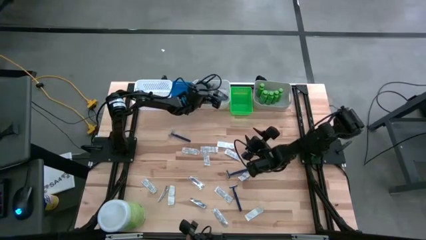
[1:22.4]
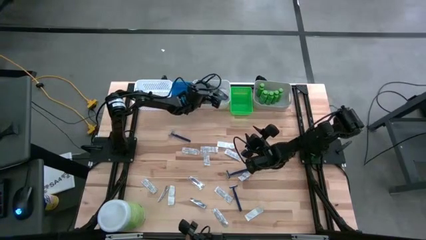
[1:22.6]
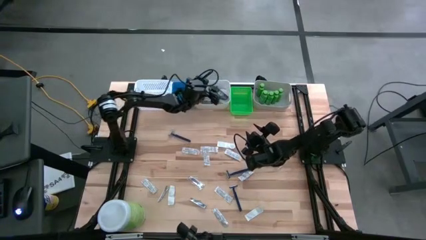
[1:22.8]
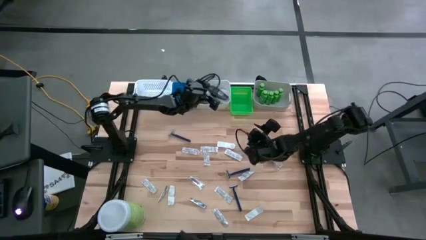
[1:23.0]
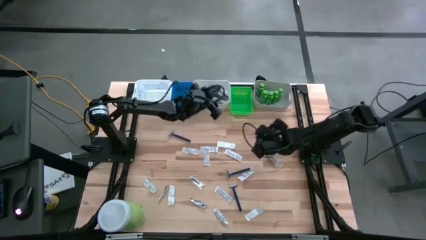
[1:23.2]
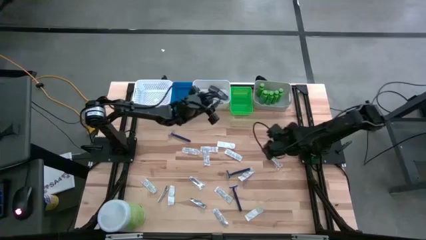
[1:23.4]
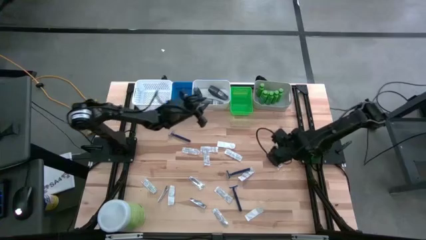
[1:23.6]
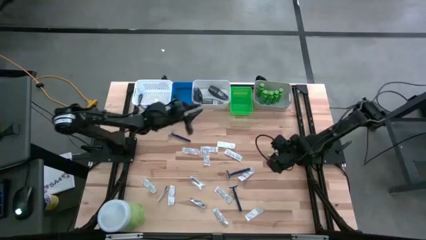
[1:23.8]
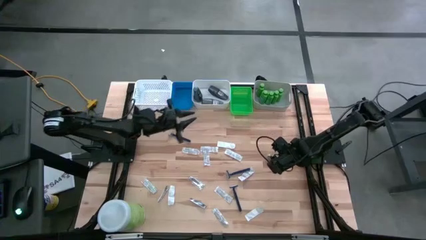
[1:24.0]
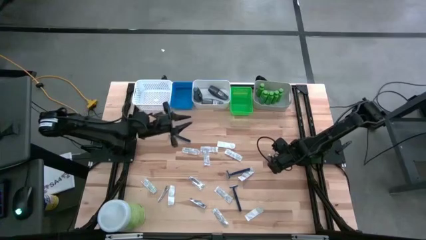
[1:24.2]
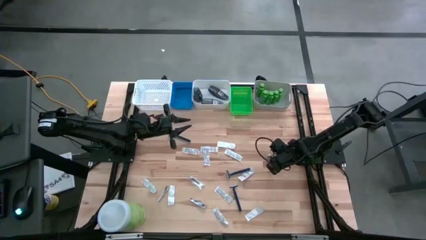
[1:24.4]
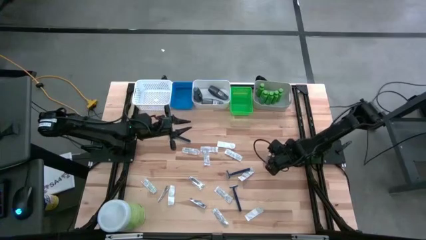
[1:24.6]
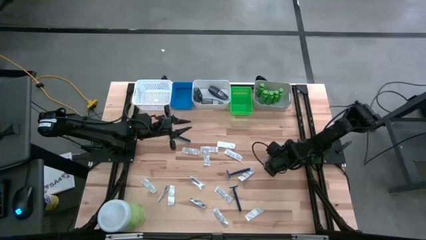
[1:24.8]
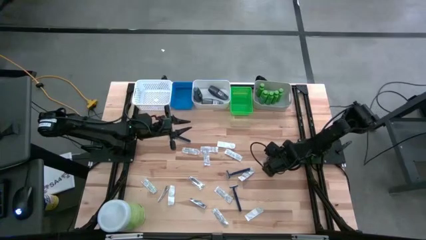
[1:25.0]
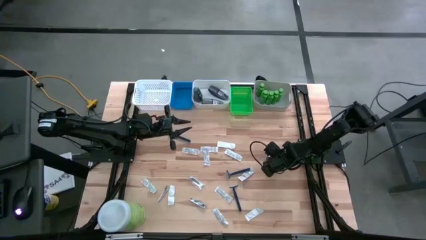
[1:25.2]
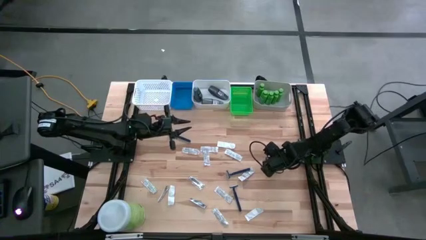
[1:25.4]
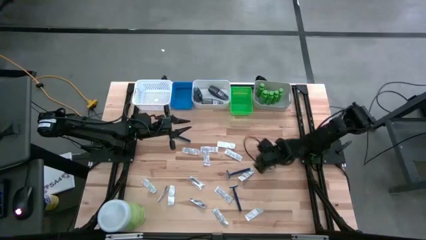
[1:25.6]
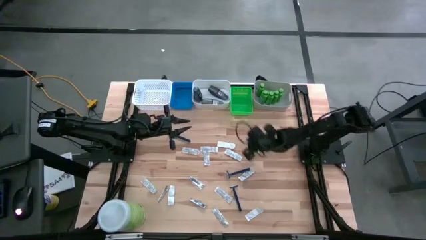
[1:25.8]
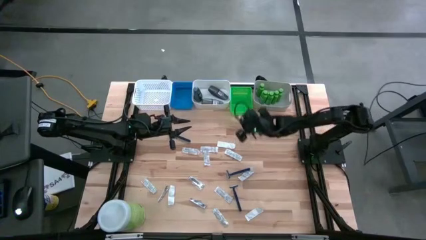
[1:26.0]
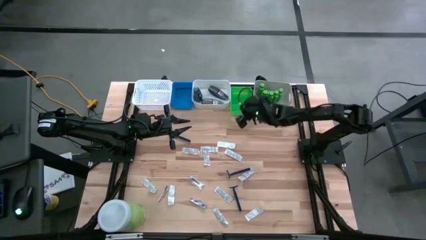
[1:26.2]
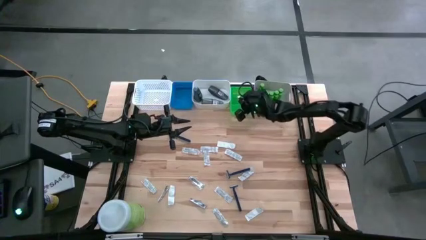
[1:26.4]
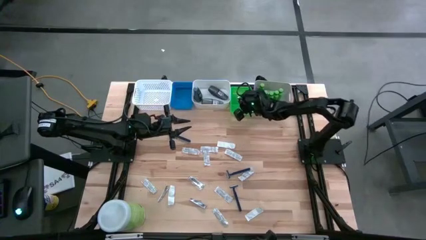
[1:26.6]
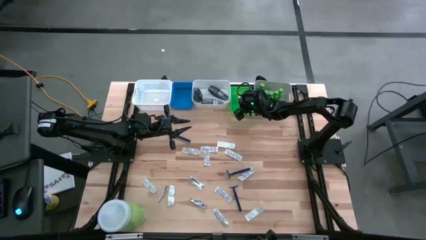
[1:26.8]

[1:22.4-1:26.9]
Task: Pick & Place Travel size toiletries
Put the nail cutter into the green bin

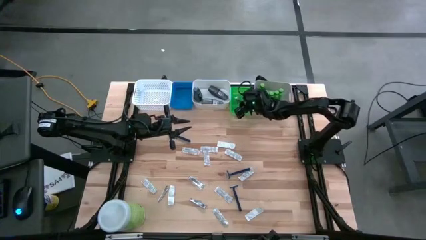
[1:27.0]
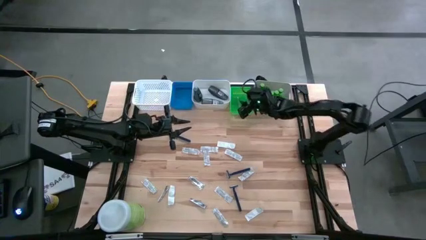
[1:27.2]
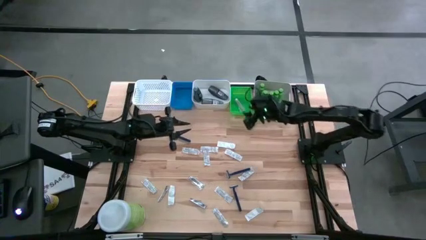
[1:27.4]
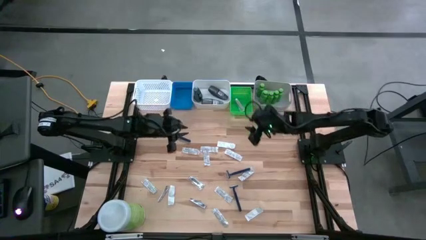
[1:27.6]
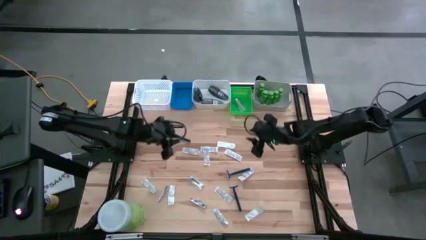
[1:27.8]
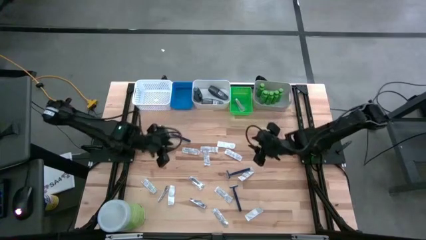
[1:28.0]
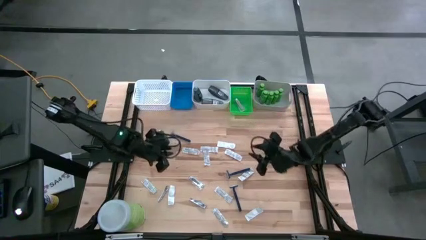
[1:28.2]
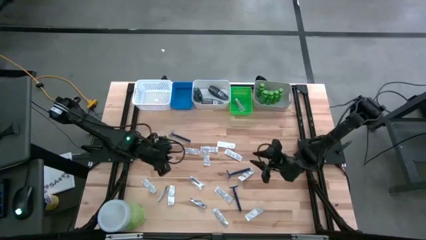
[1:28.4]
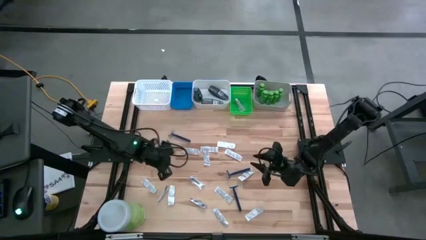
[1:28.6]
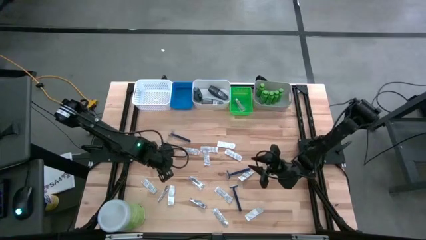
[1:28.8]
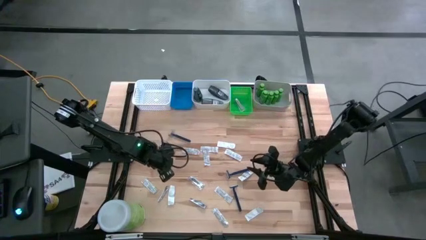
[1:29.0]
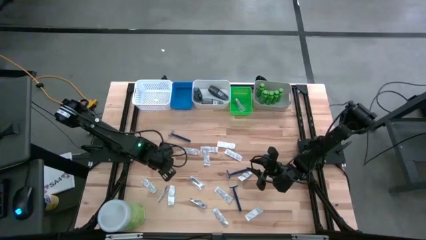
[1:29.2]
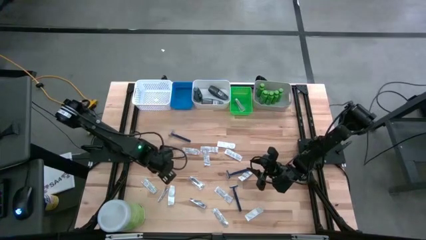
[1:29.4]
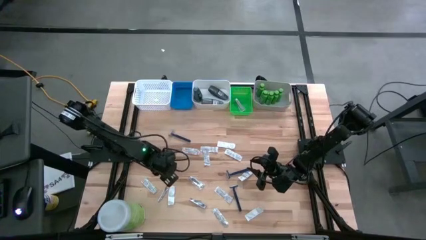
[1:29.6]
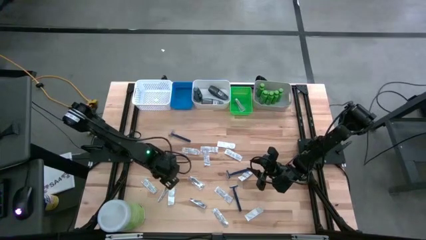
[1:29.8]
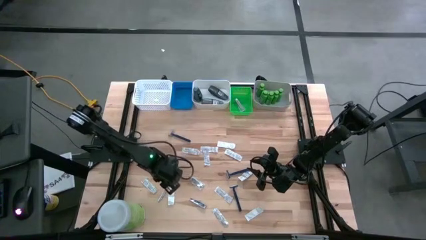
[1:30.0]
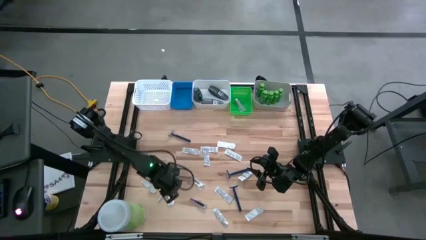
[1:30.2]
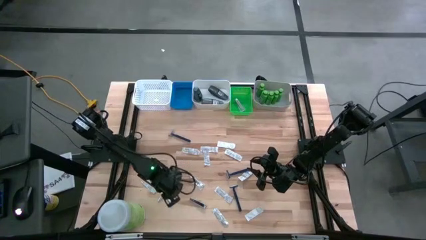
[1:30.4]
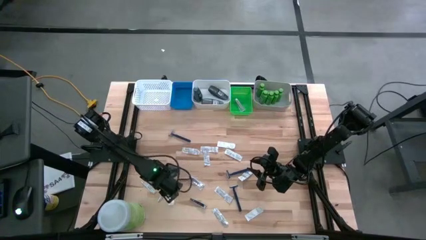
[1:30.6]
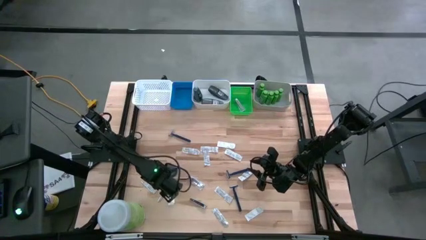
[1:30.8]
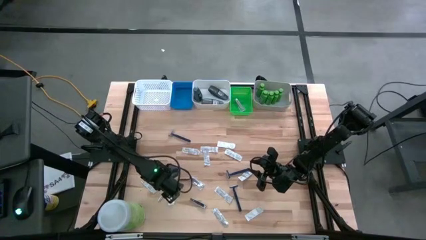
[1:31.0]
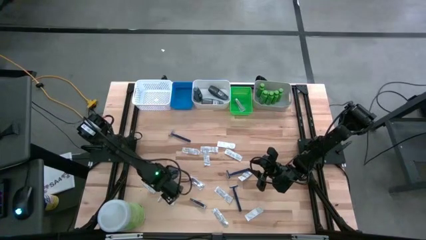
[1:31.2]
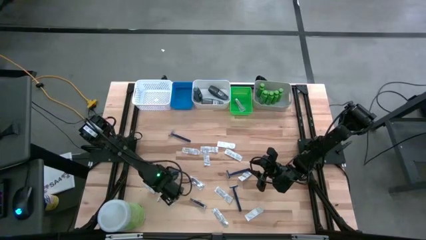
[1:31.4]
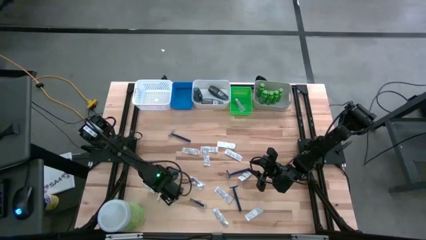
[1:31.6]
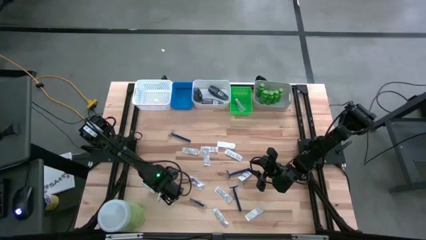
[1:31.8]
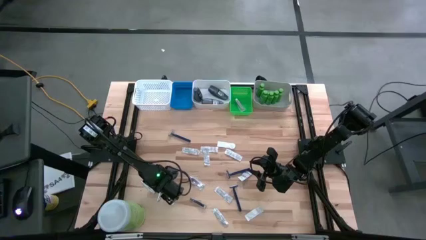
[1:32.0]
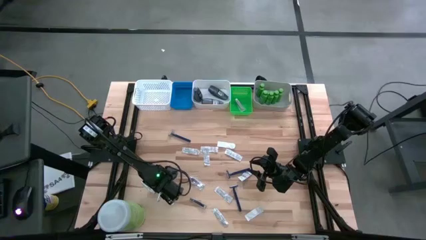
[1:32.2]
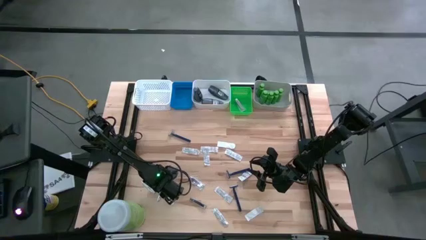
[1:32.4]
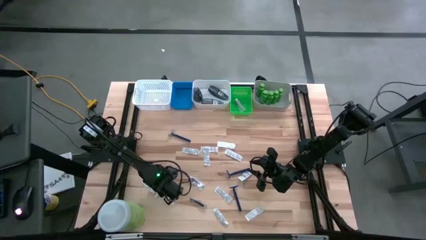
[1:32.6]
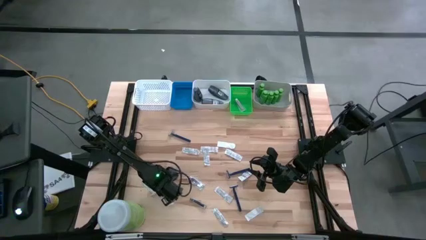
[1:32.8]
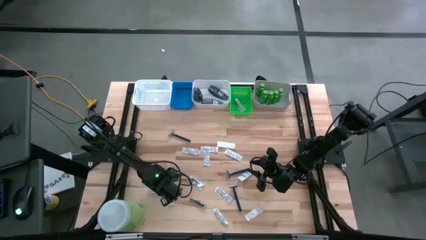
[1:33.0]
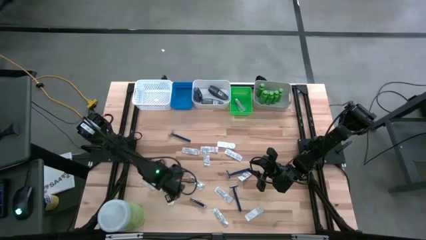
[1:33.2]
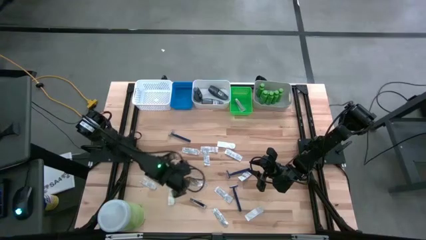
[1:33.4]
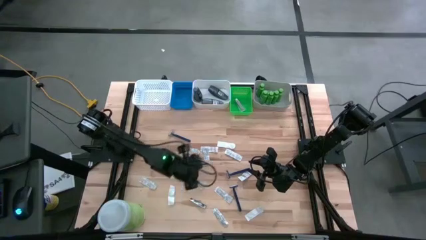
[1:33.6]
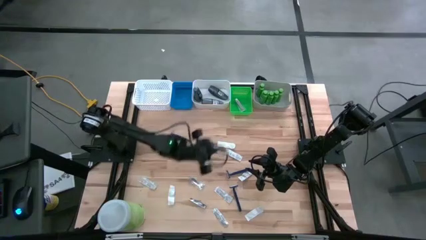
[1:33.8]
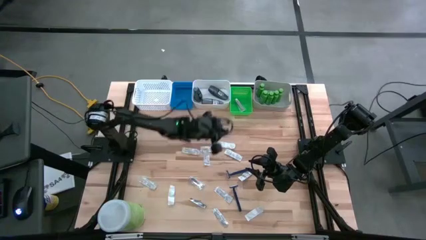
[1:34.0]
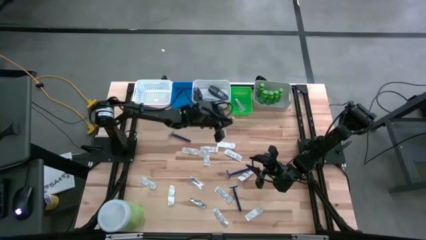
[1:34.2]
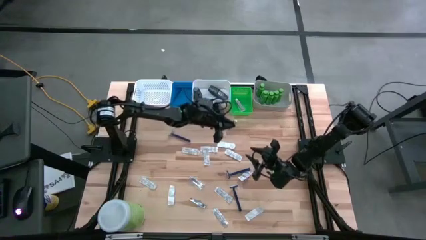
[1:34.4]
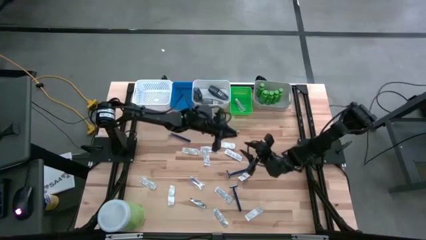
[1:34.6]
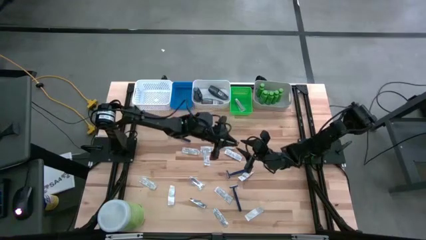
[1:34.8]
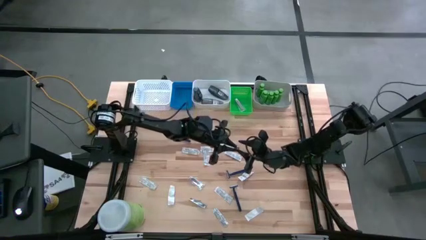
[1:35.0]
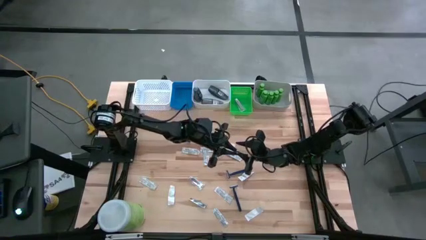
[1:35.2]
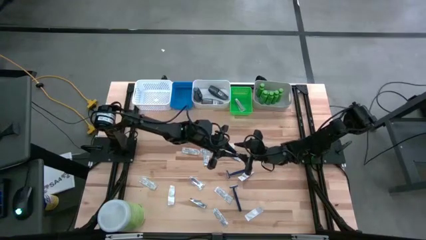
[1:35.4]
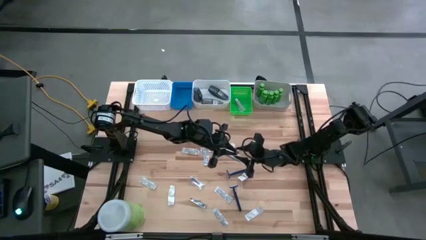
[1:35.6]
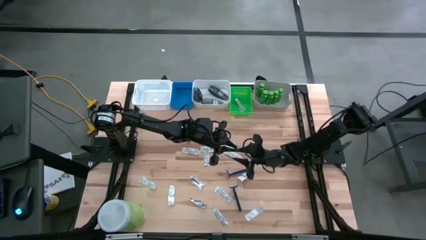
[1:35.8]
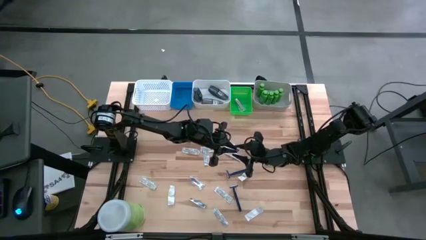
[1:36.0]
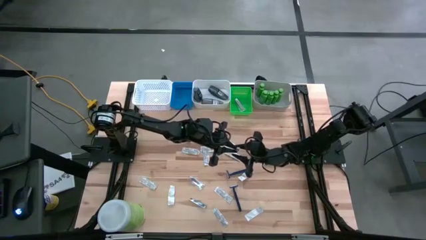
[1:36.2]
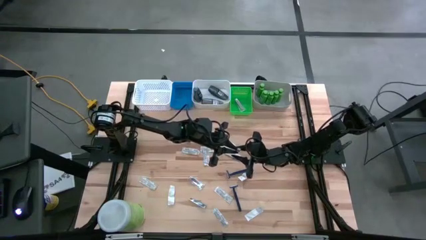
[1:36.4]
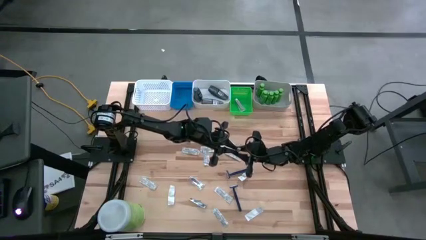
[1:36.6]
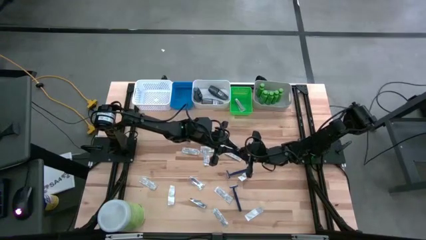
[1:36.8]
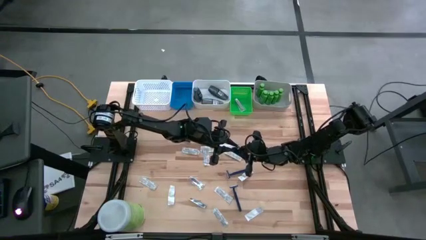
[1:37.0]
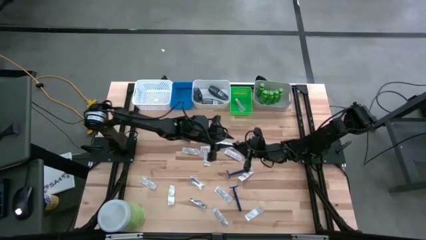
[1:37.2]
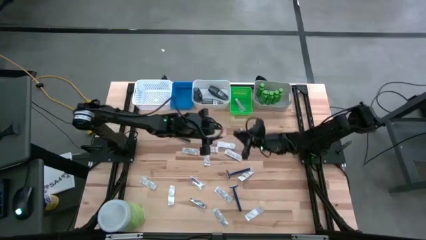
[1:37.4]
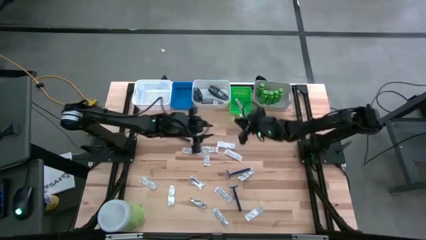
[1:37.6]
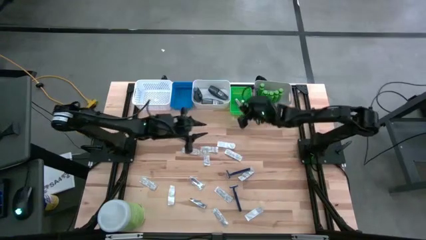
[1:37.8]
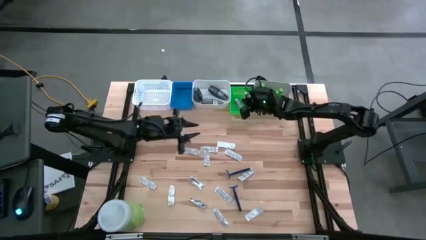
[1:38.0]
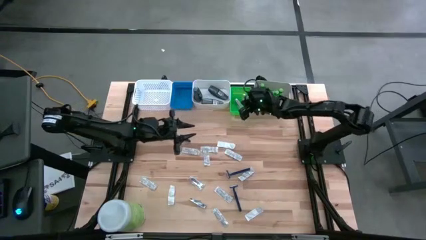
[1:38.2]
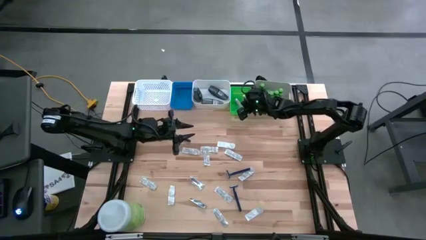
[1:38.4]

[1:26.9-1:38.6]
Put the nail cutter into the green bin
